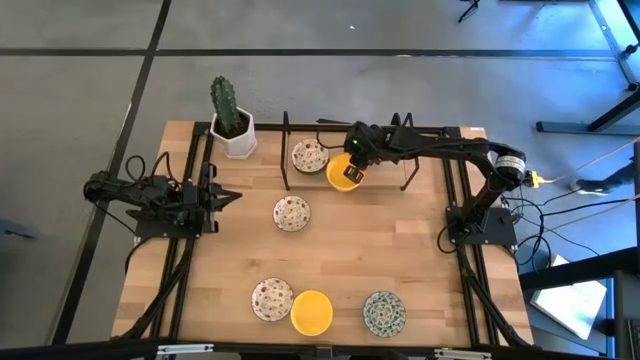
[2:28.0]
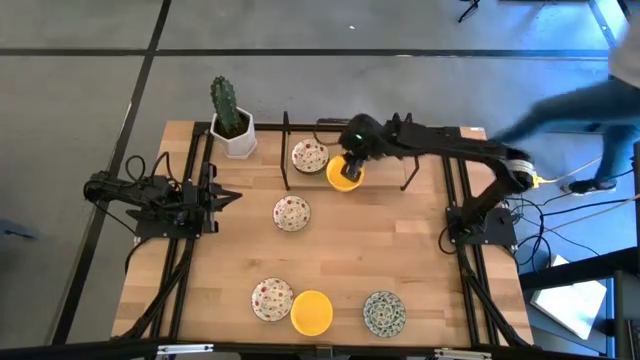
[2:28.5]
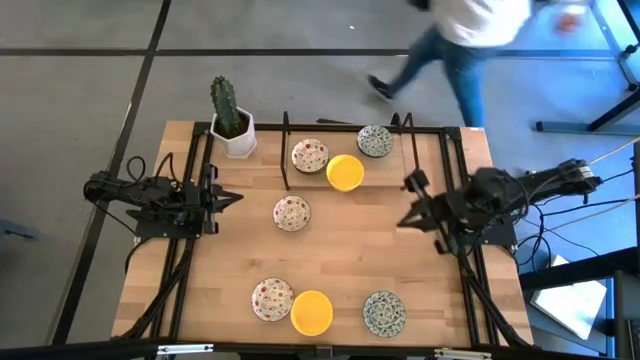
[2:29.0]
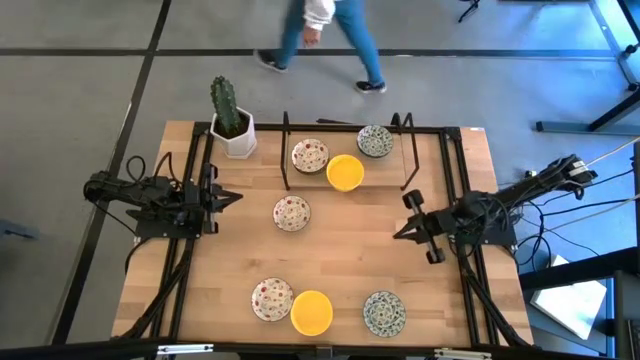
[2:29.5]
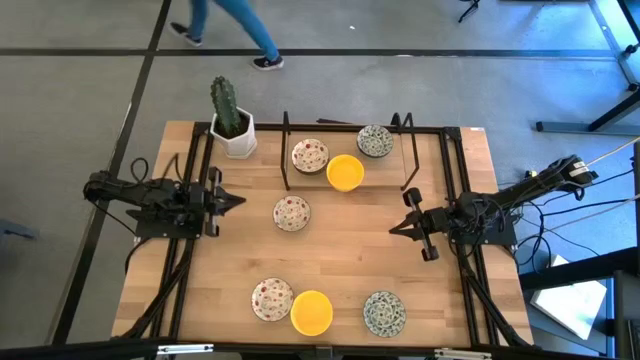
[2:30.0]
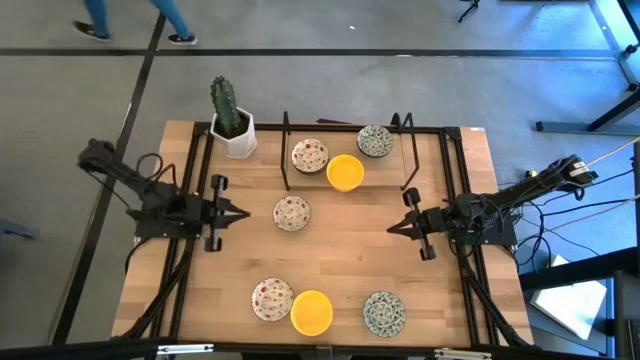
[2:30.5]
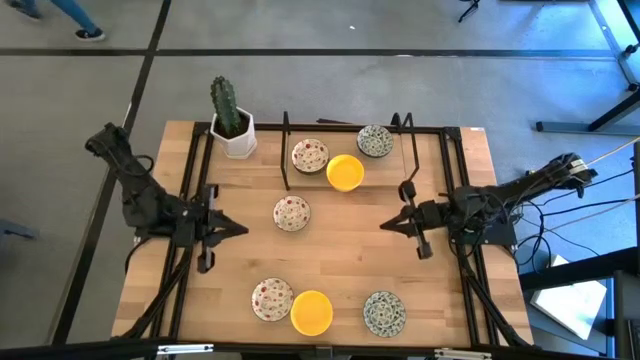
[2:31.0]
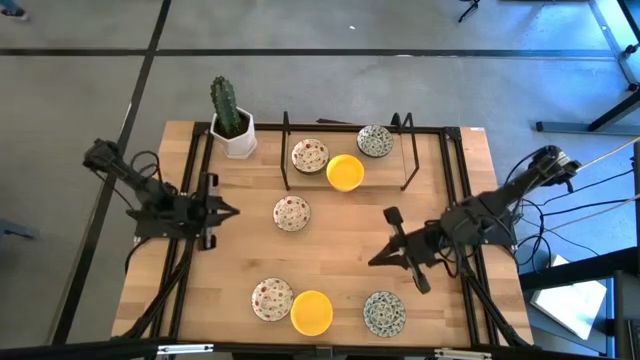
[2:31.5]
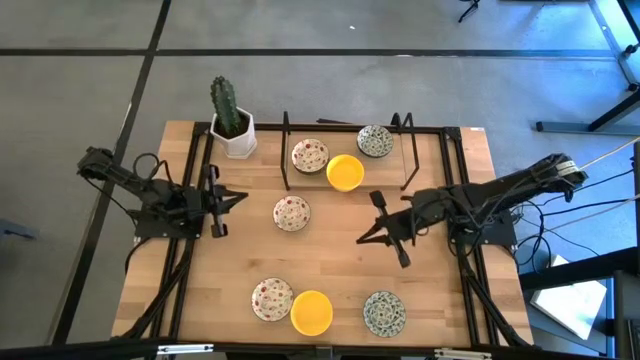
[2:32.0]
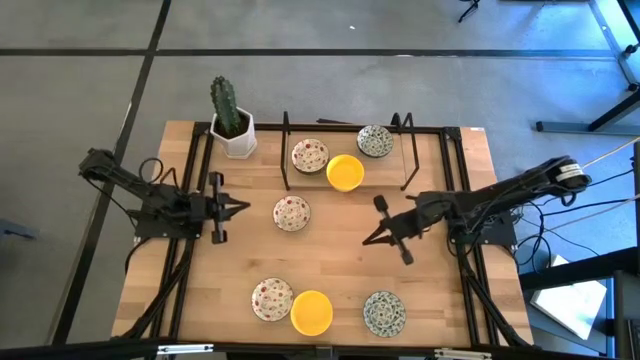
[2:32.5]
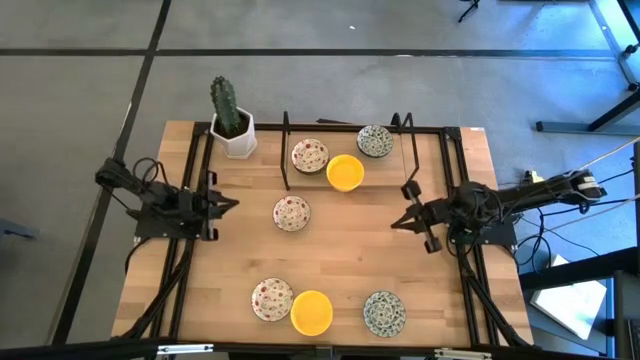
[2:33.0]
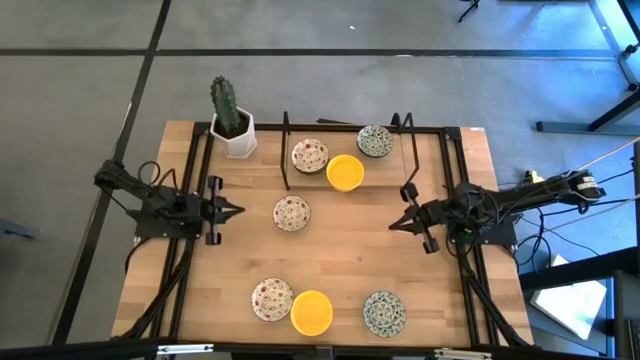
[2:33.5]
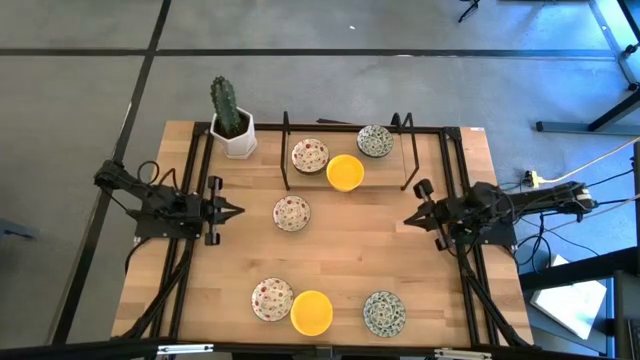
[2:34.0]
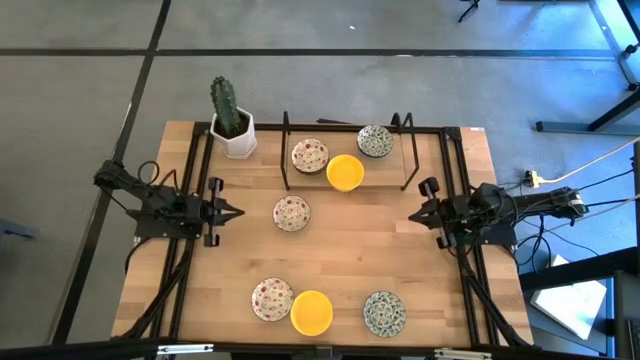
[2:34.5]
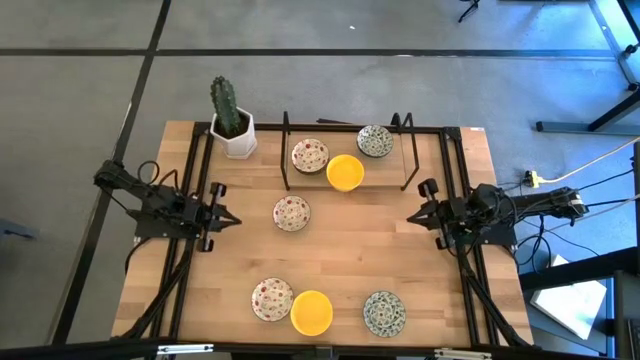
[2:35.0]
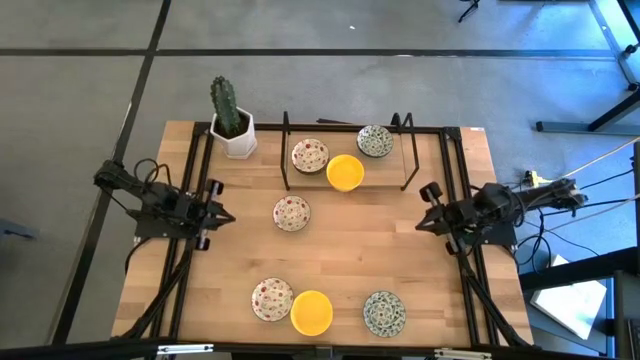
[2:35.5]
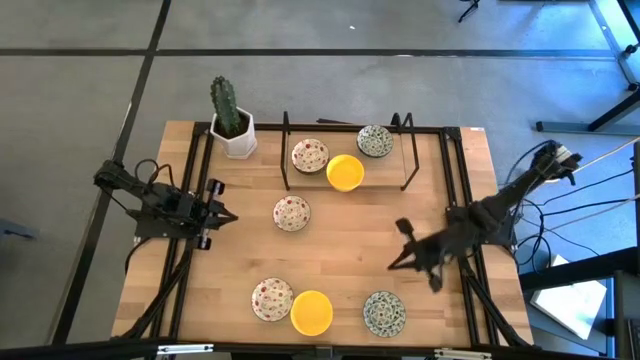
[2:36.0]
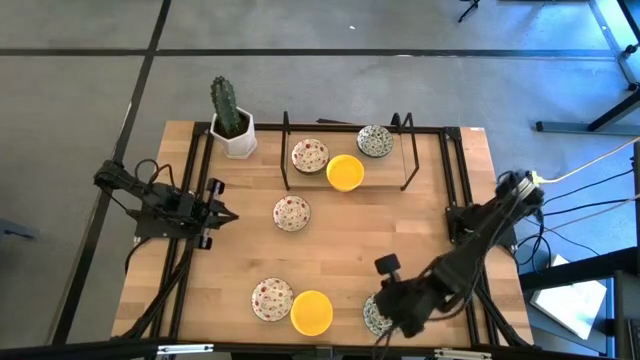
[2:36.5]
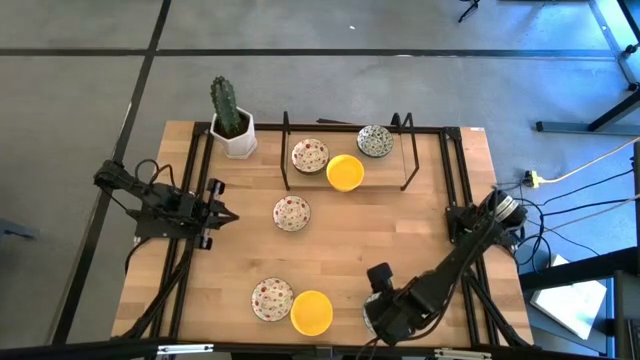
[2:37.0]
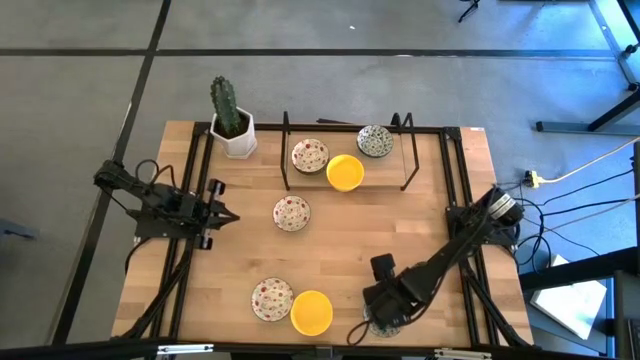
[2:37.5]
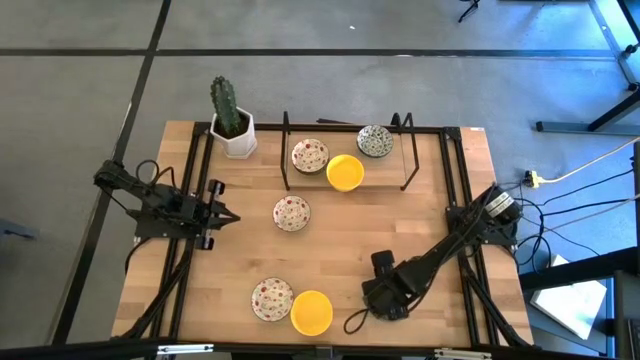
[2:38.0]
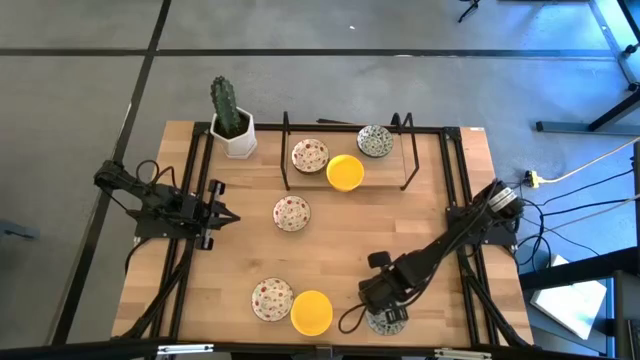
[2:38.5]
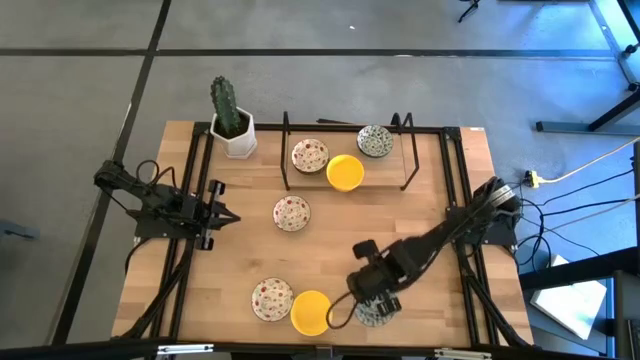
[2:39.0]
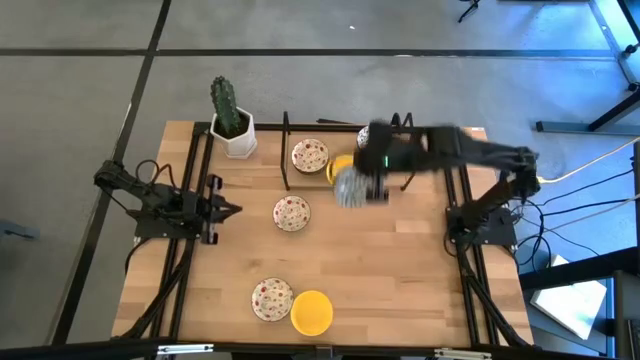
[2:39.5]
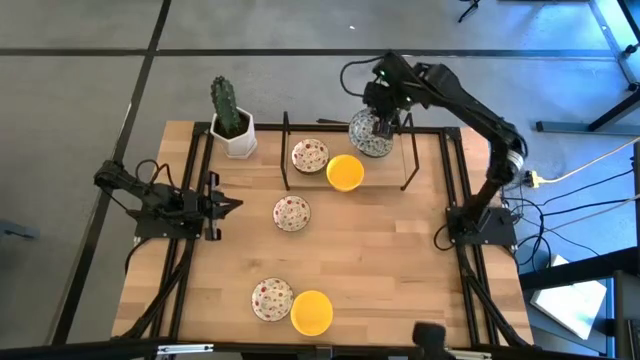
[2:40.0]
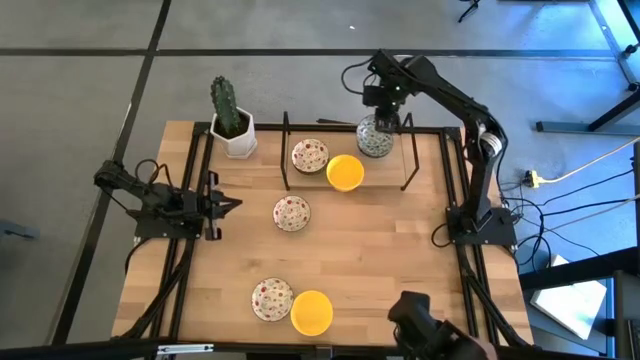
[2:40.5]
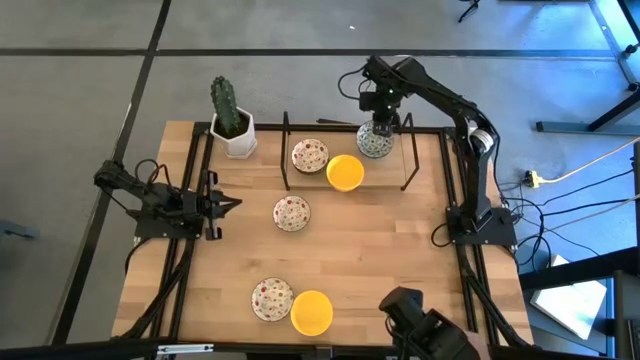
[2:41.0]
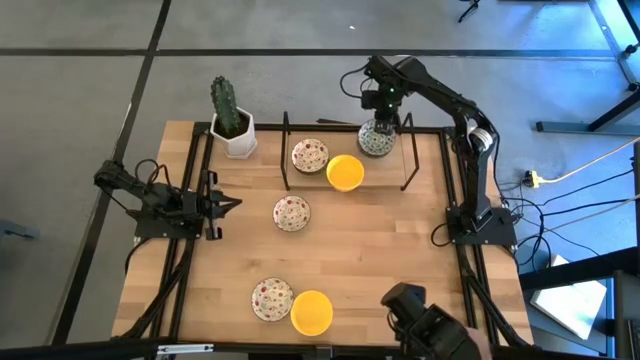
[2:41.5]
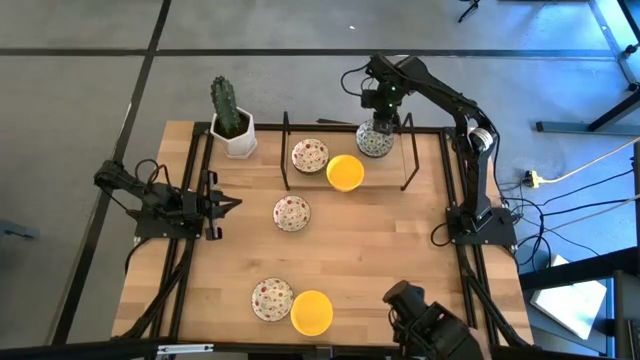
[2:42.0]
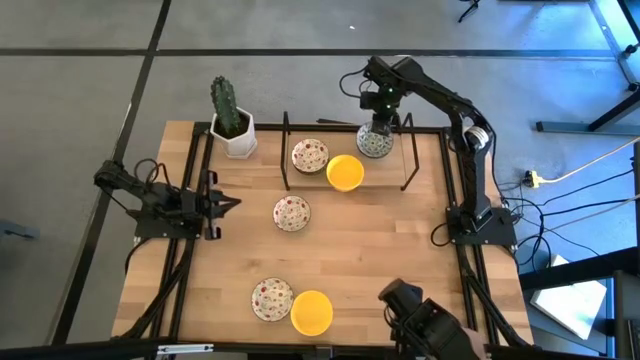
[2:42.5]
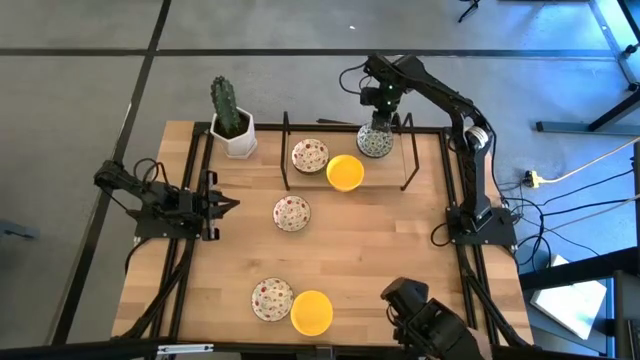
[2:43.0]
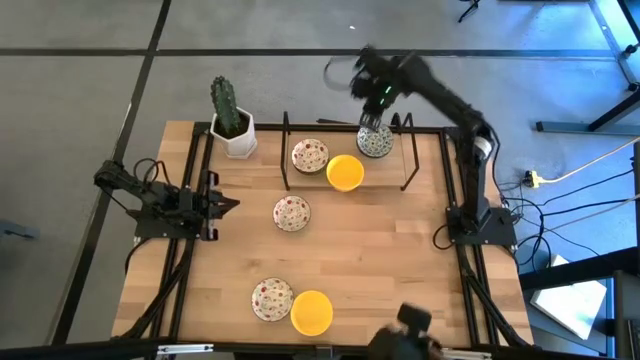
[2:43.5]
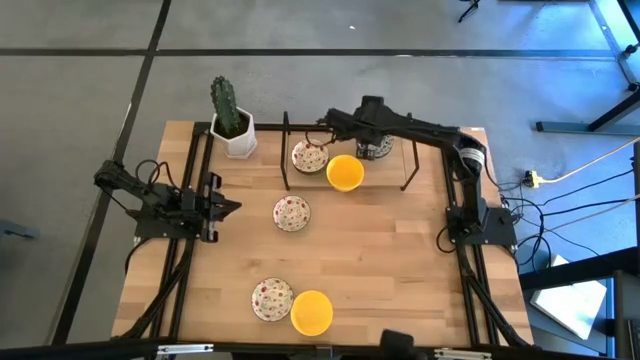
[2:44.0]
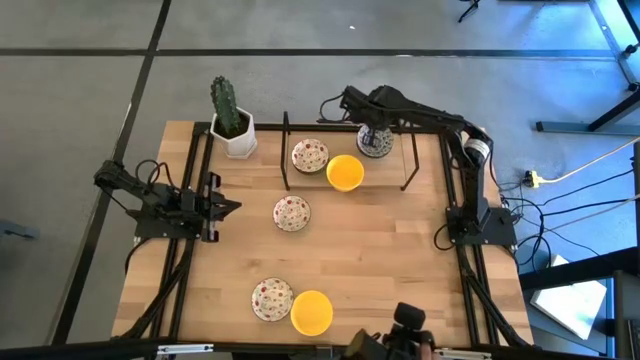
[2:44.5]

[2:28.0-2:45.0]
Task: Pick & Place Mini bowls
Stack the blue patterned bowl on the blue patterned bowls on the shelf

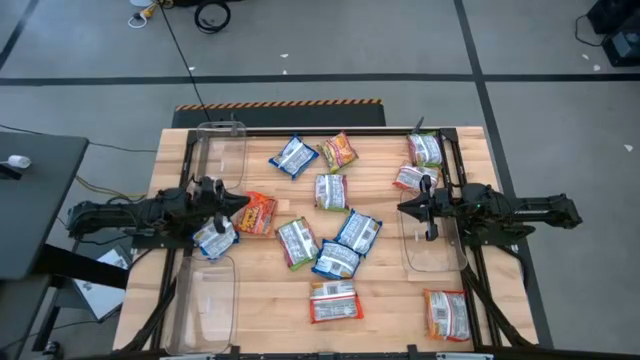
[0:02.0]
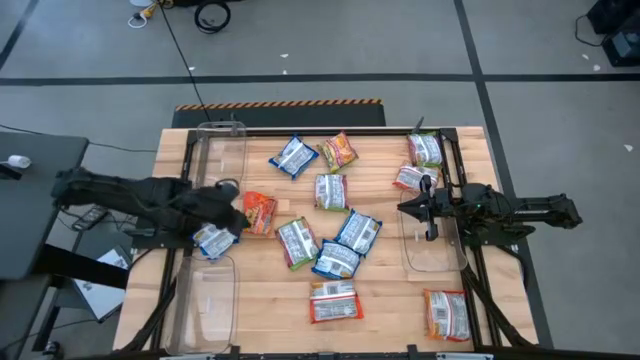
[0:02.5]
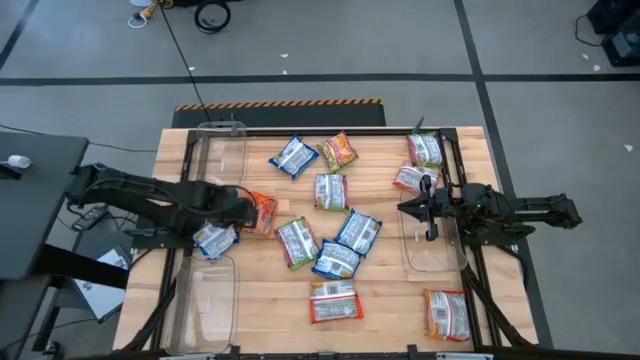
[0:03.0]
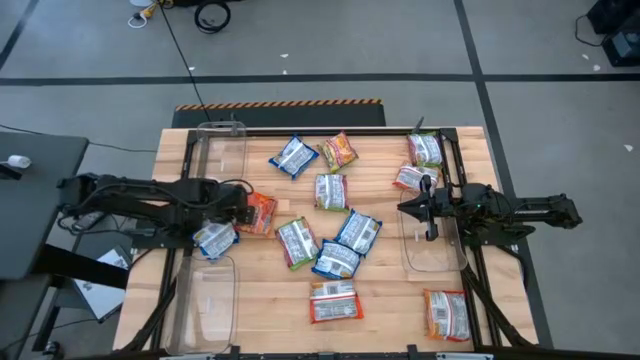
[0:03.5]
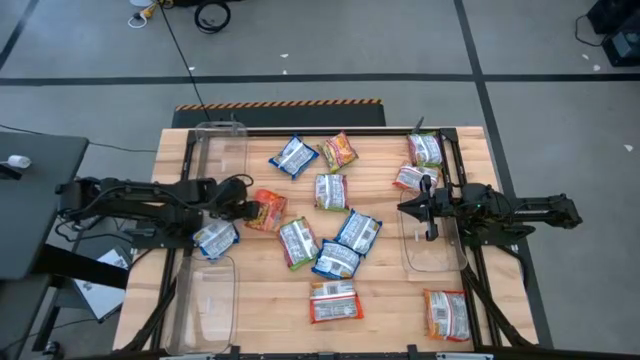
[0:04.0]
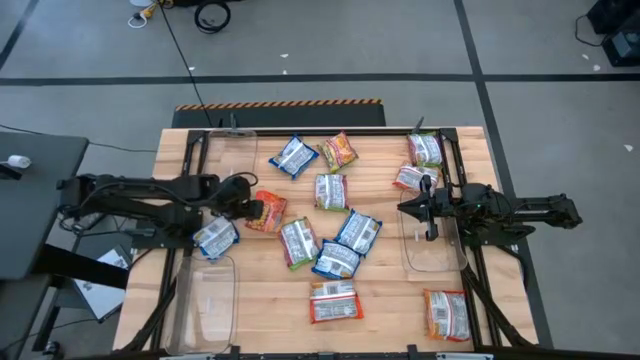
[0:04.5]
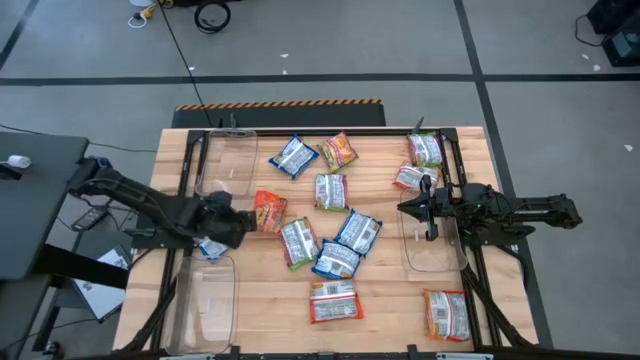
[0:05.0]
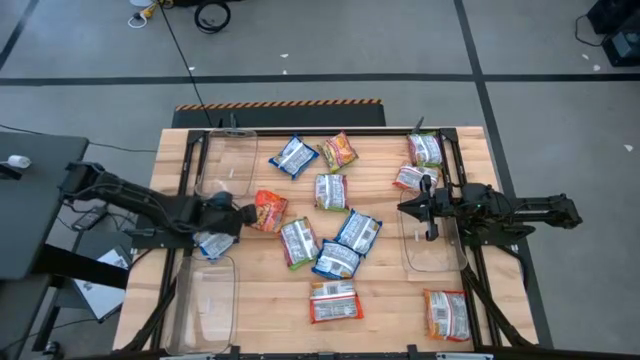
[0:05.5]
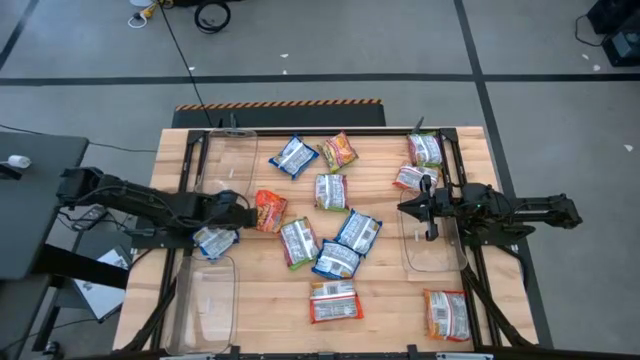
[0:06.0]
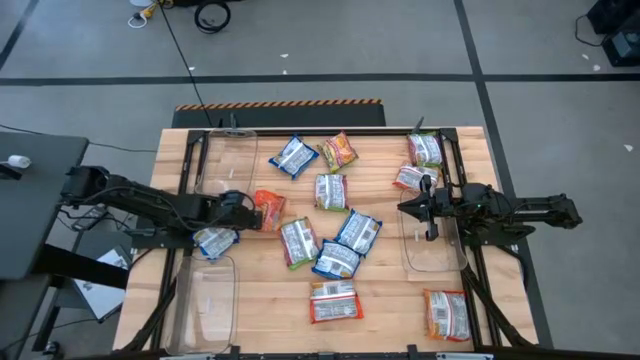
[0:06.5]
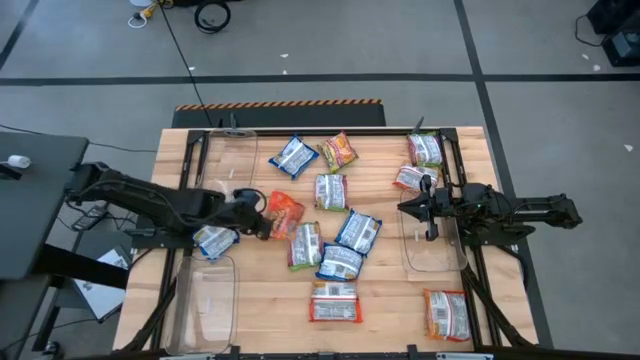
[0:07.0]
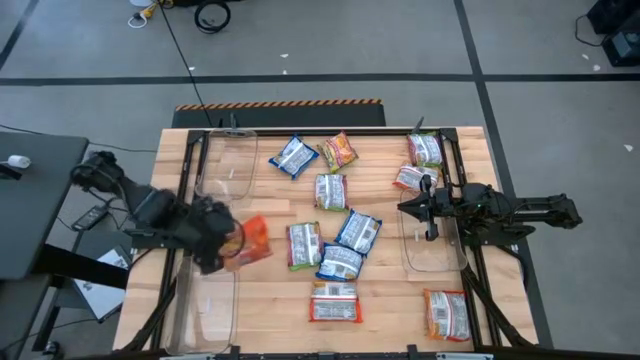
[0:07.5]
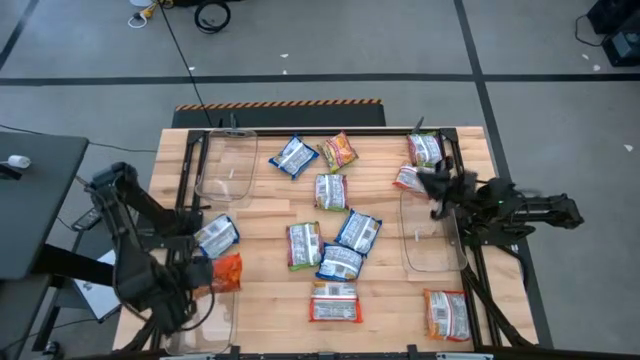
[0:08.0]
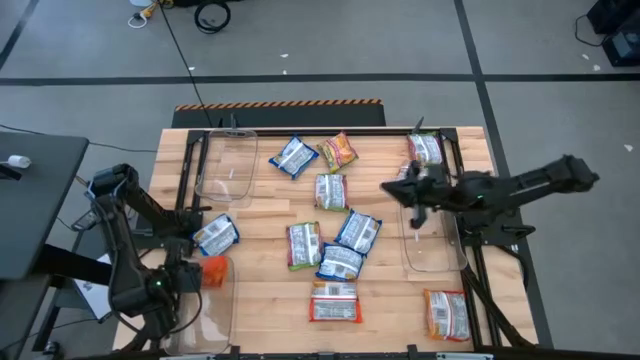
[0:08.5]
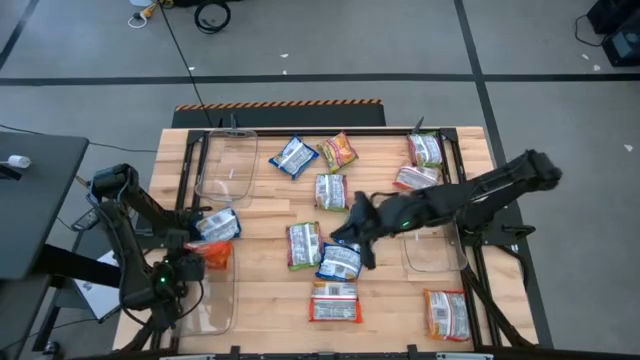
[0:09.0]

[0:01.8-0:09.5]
Task: Sort Maruchan noodles
Put the orange noodle pack into the bottom left transparent bin
